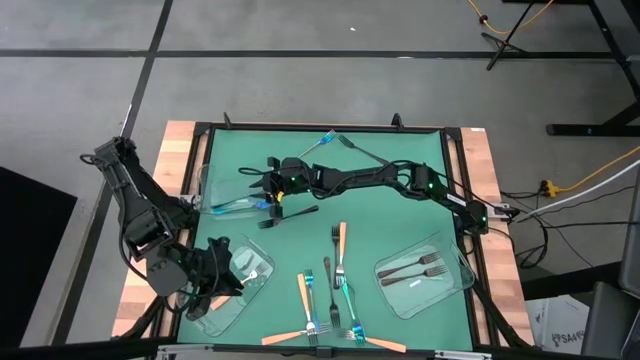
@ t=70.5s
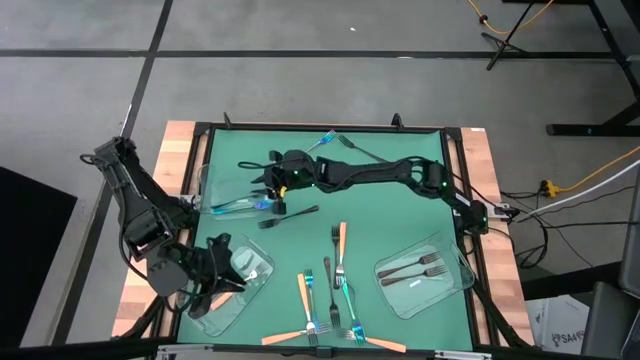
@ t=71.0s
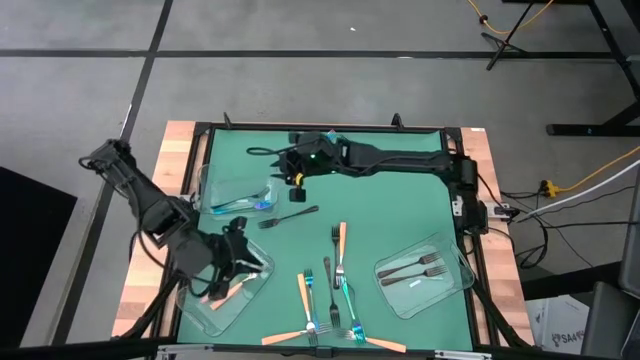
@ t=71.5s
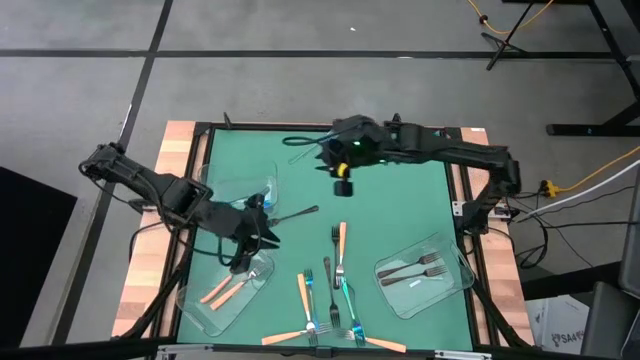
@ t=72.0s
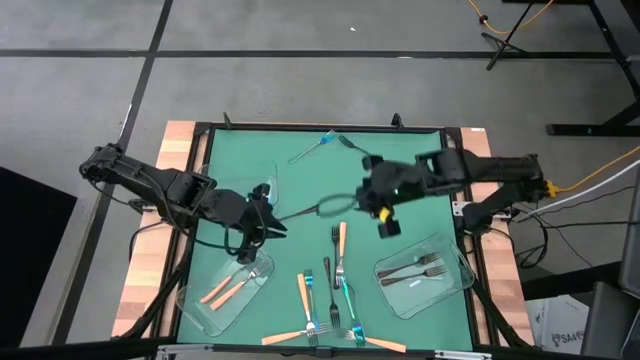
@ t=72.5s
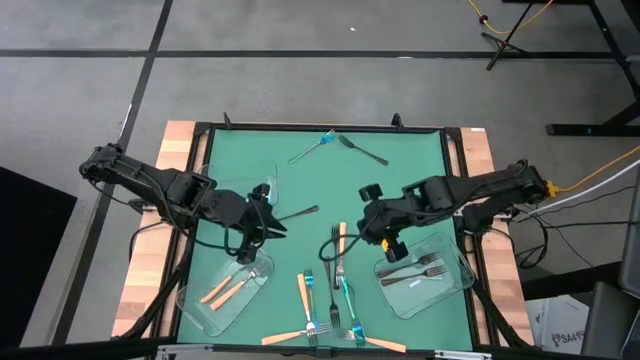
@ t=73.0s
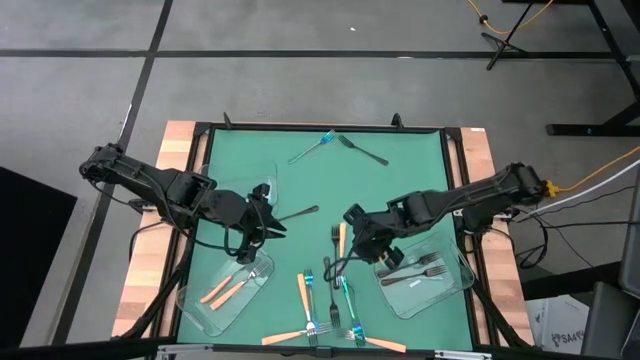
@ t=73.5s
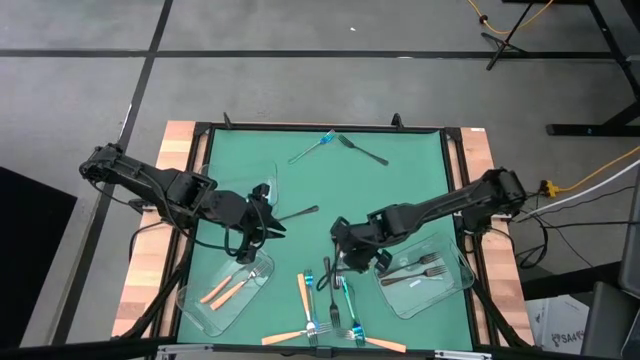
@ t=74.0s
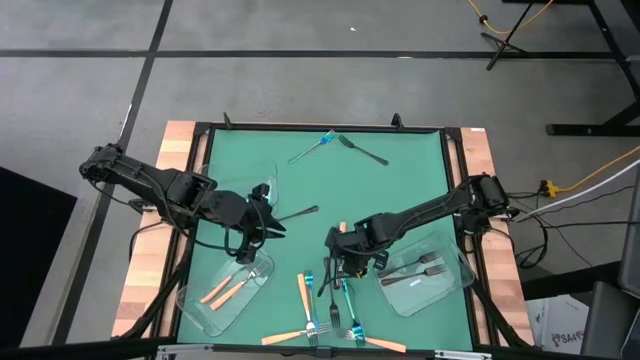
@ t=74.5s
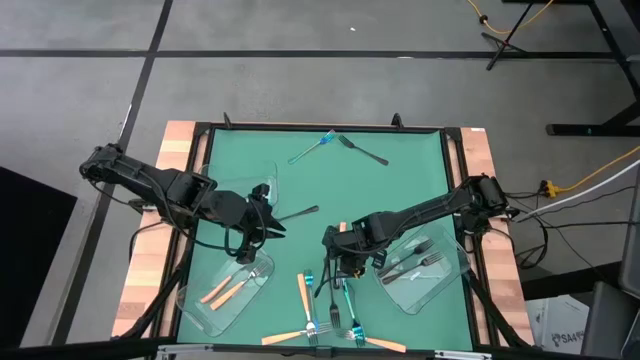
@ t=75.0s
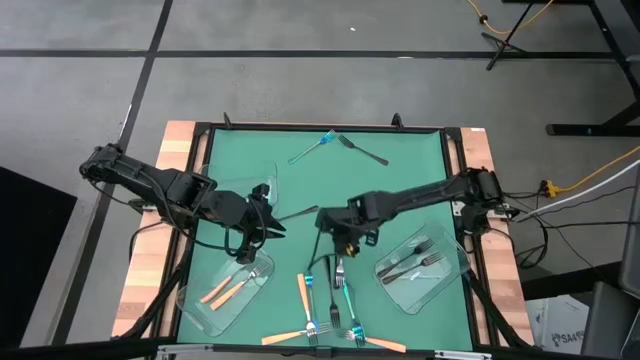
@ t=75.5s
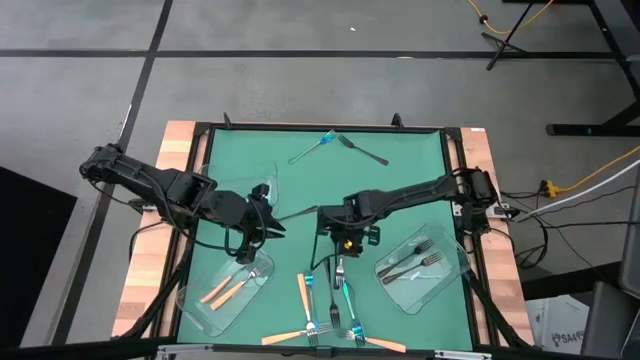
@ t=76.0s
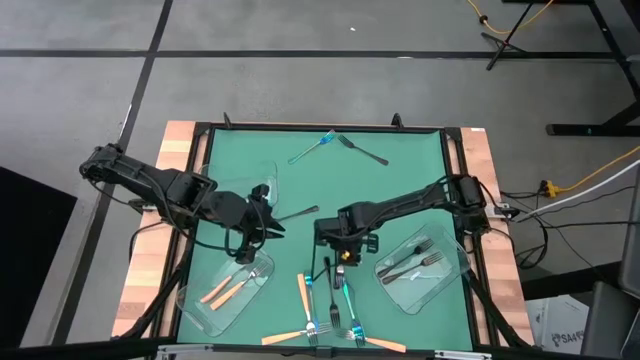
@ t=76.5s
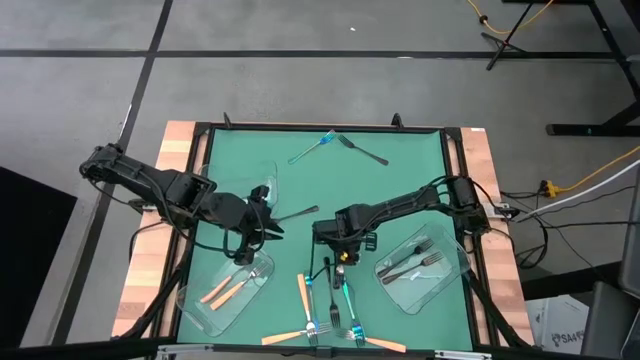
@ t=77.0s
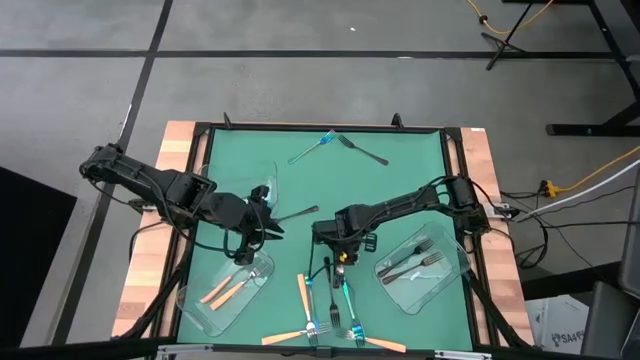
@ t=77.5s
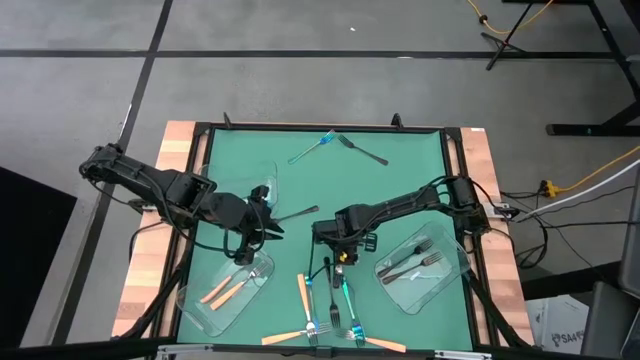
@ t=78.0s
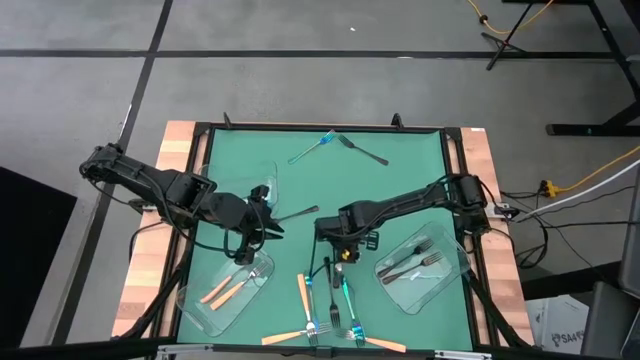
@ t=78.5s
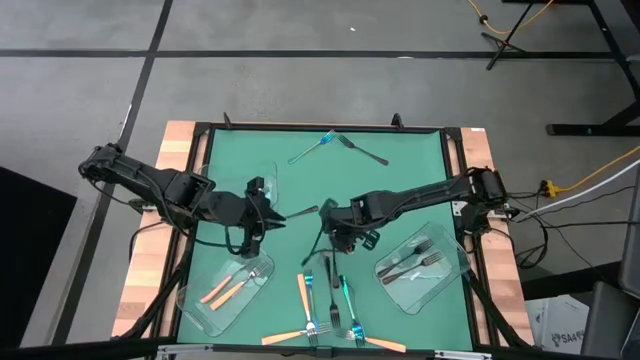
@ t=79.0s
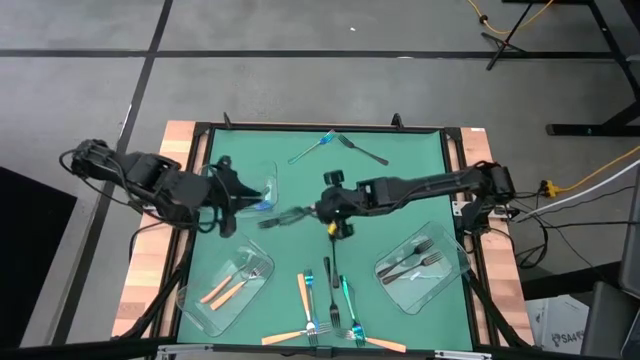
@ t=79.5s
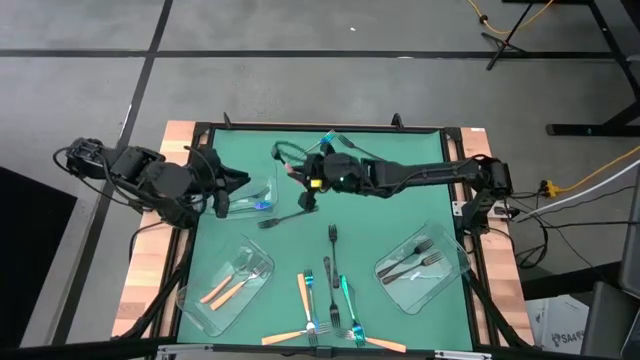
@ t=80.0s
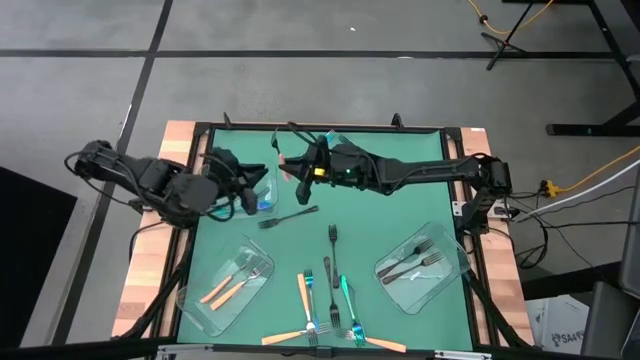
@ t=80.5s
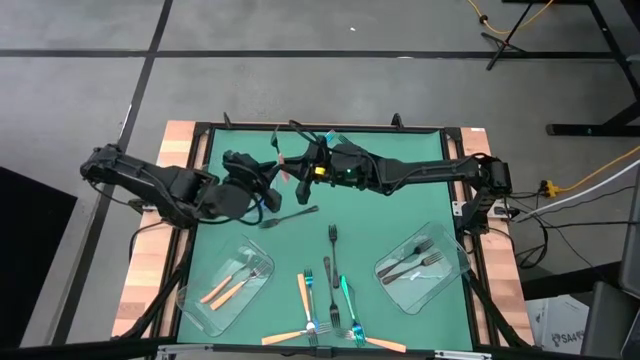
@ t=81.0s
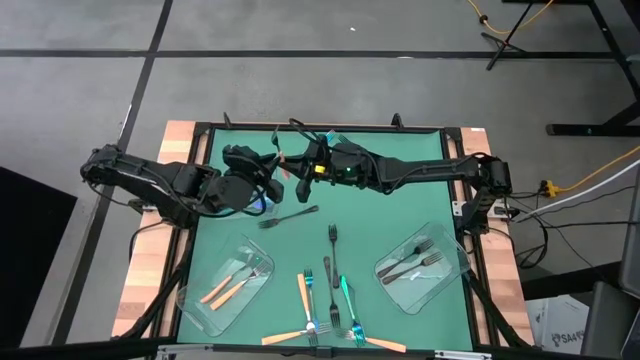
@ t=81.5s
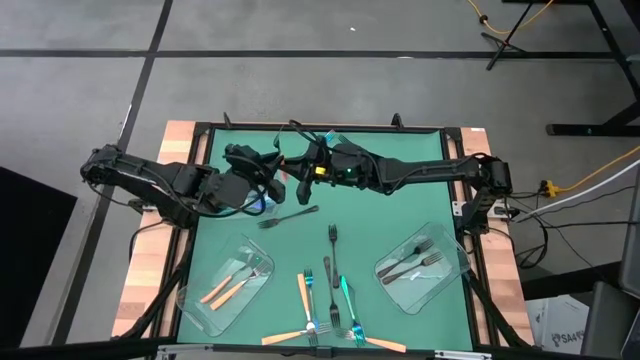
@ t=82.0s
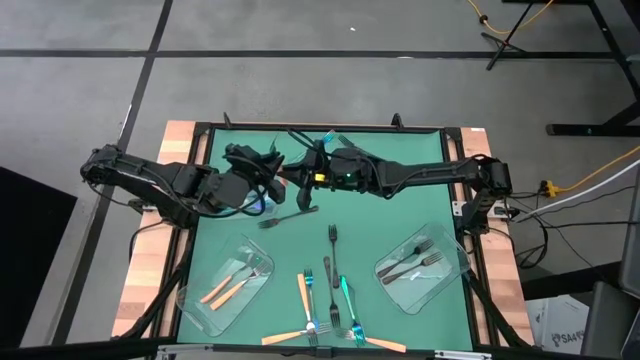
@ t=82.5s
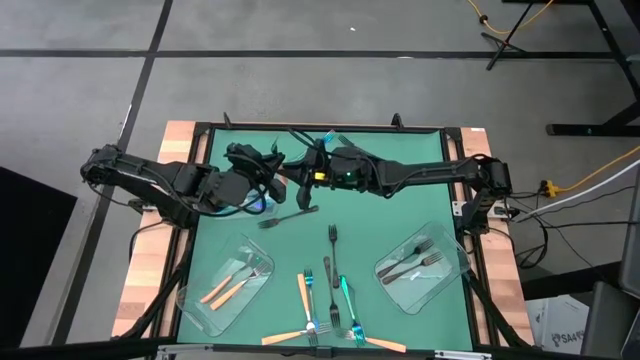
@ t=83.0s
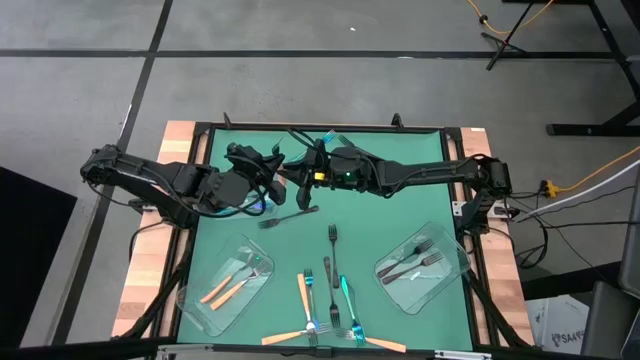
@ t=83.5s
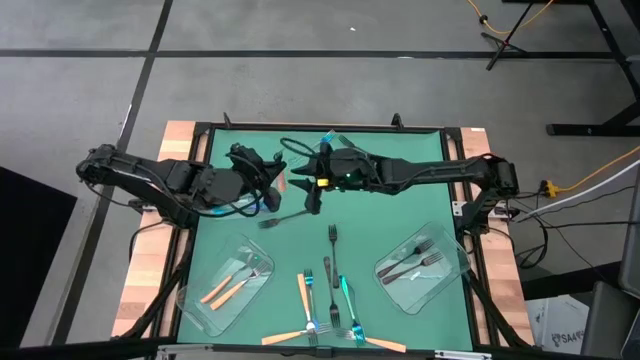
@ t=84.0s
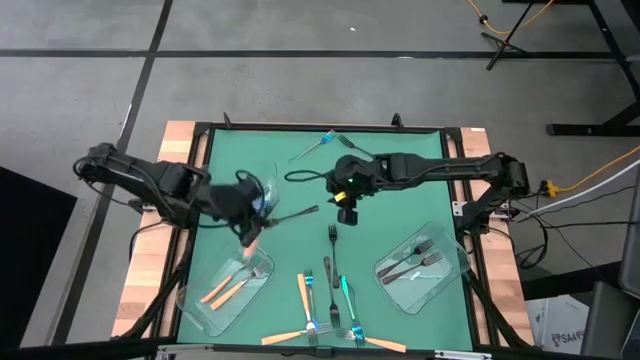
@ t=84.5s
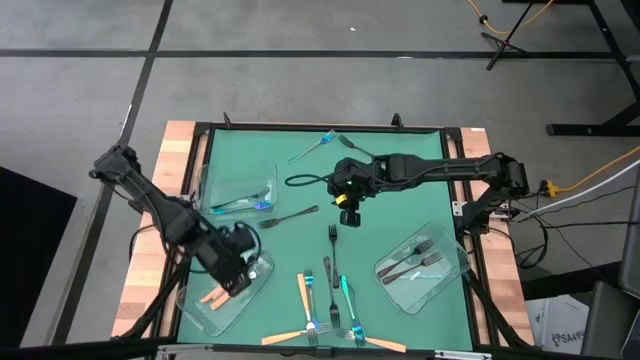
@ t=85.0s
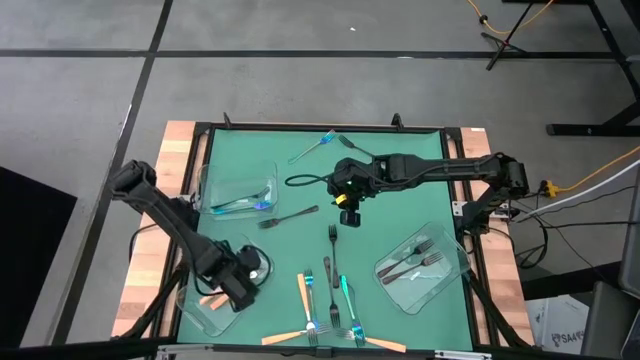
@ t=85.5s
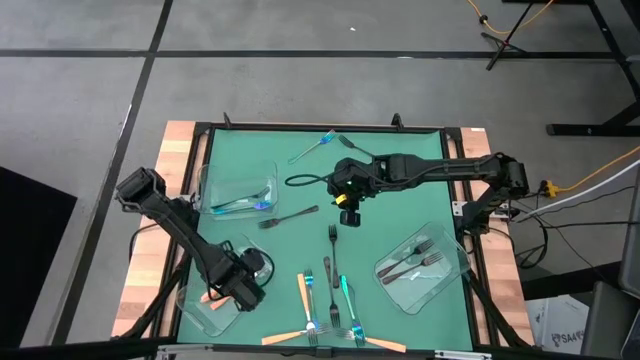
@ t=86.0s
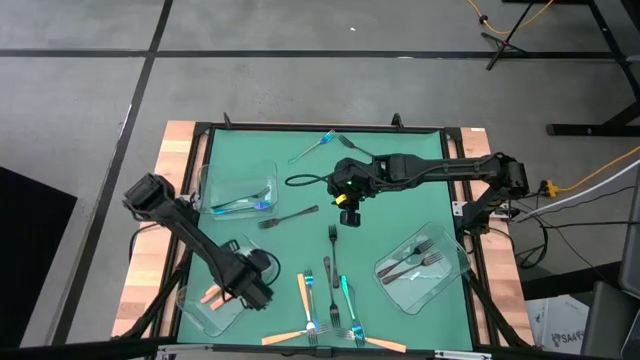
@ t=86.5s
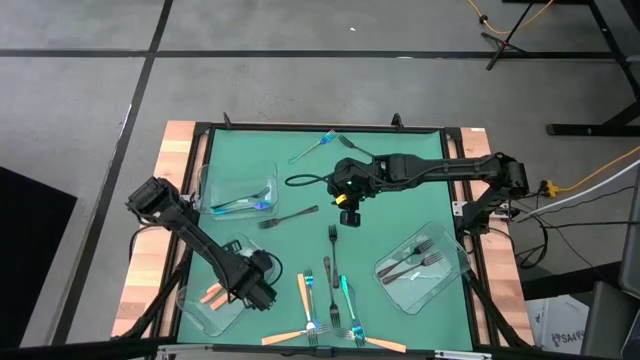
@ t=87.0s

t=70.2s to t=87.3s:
Task: Sort silverware by color (type)
Put the yellow fork into the bottom left transparent bin
